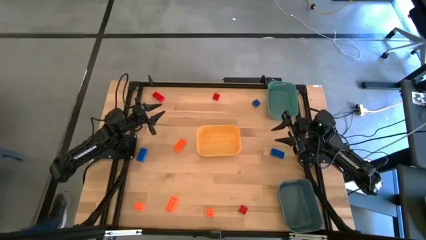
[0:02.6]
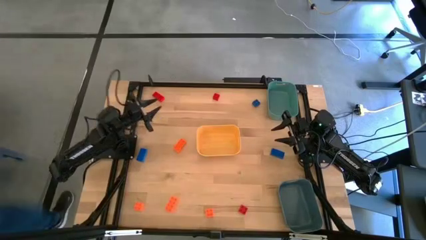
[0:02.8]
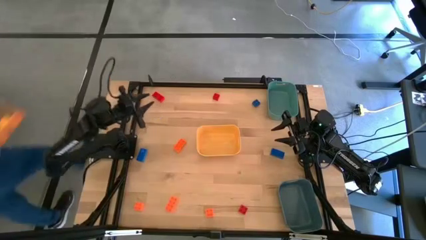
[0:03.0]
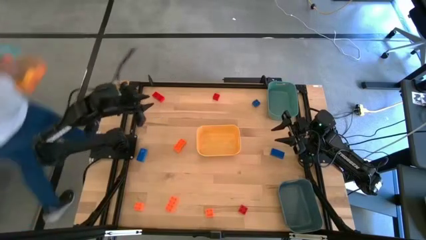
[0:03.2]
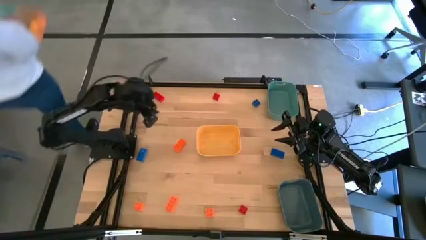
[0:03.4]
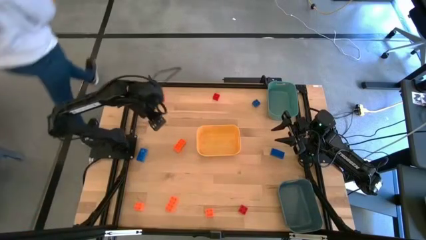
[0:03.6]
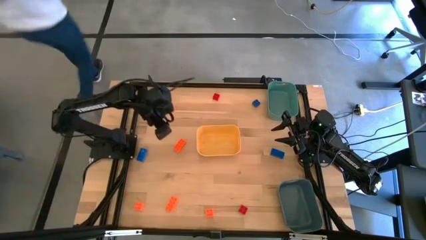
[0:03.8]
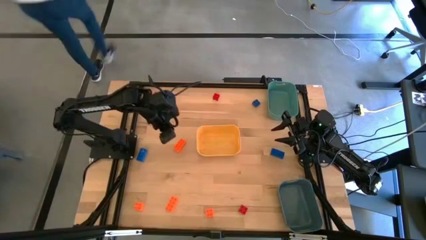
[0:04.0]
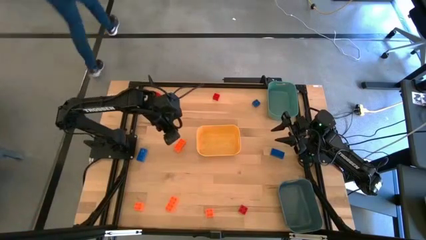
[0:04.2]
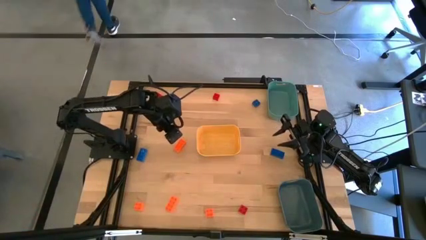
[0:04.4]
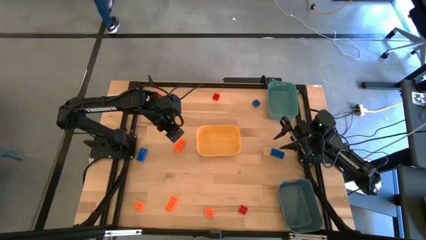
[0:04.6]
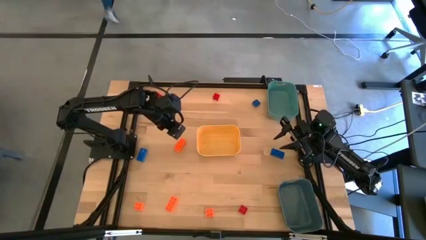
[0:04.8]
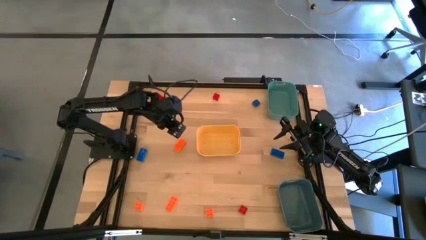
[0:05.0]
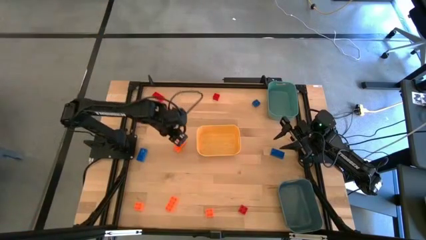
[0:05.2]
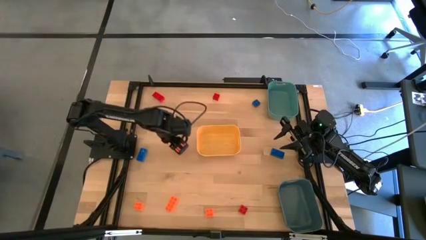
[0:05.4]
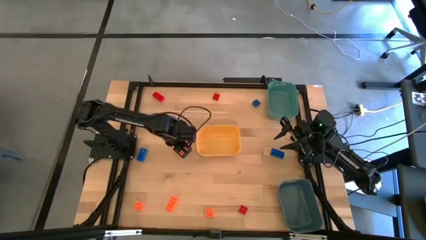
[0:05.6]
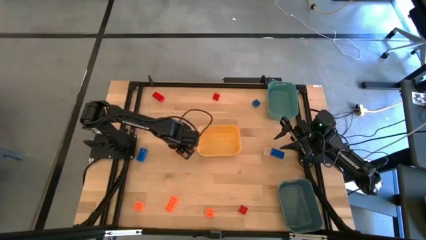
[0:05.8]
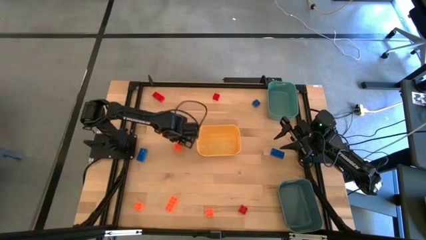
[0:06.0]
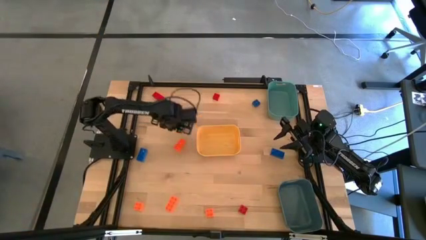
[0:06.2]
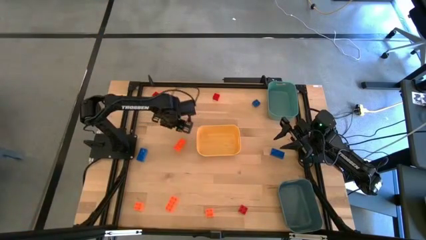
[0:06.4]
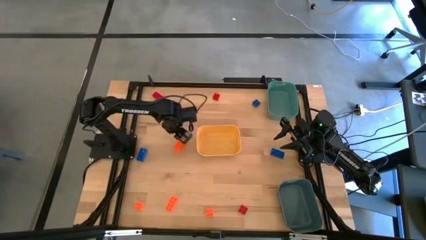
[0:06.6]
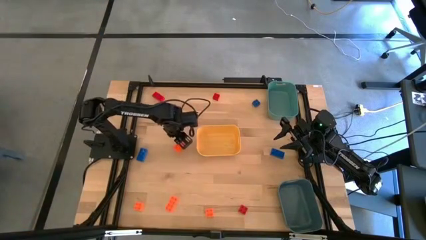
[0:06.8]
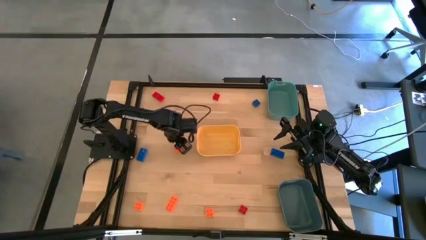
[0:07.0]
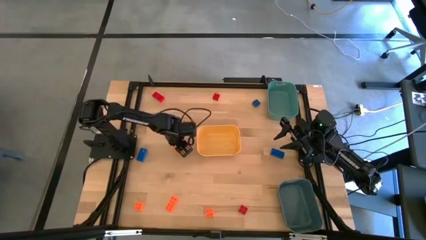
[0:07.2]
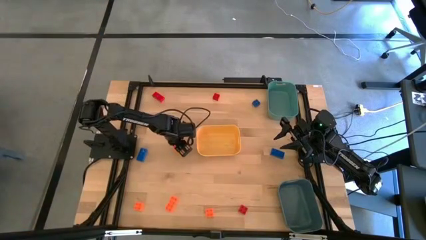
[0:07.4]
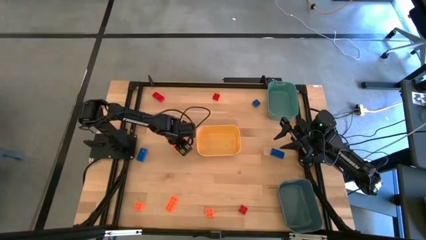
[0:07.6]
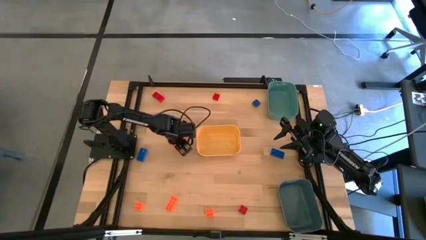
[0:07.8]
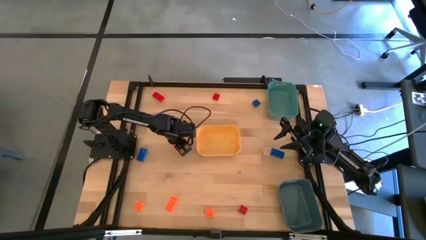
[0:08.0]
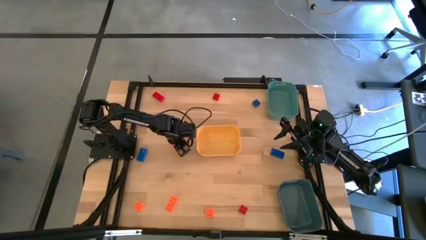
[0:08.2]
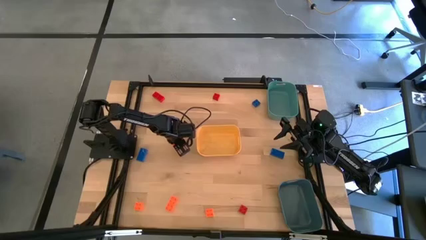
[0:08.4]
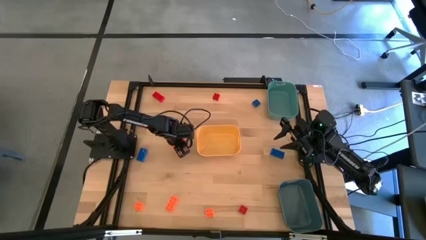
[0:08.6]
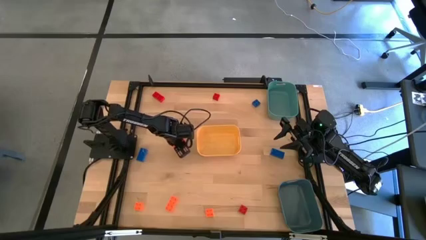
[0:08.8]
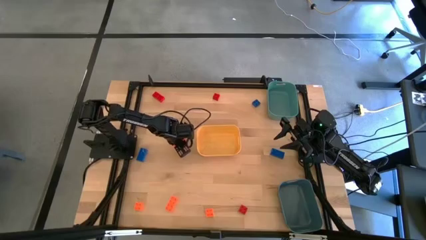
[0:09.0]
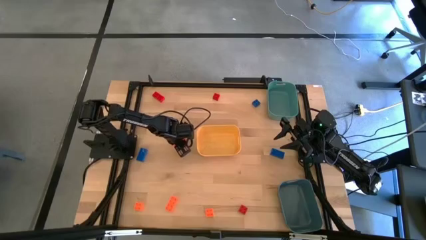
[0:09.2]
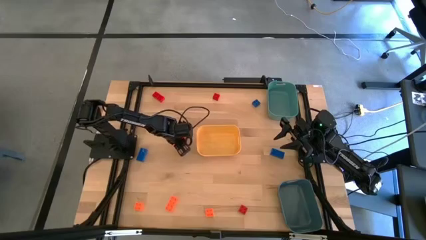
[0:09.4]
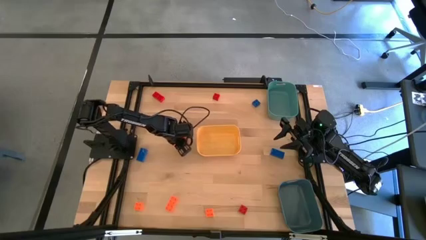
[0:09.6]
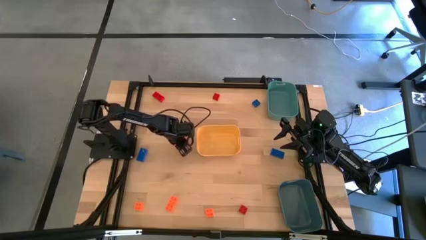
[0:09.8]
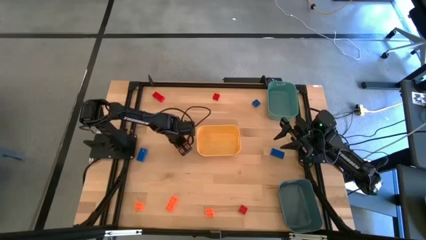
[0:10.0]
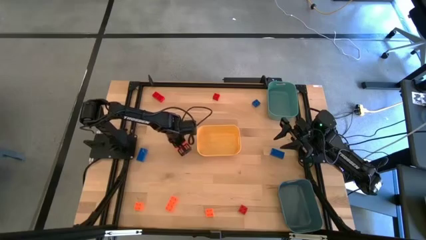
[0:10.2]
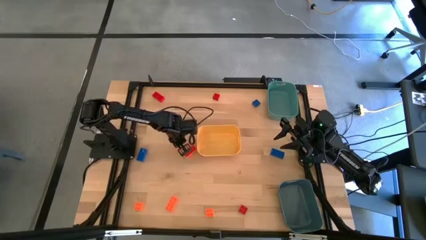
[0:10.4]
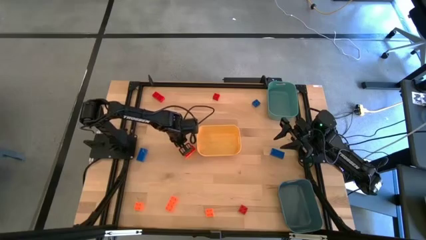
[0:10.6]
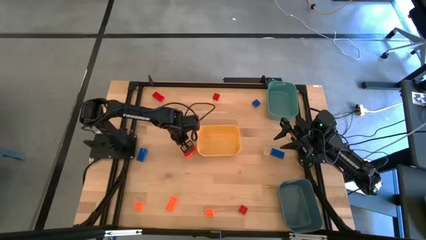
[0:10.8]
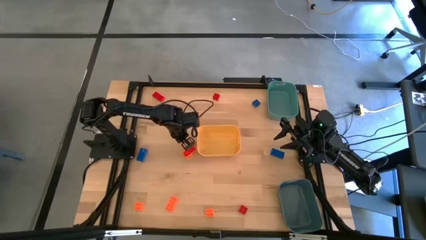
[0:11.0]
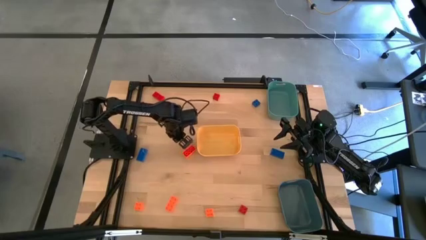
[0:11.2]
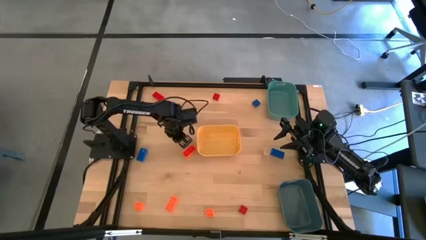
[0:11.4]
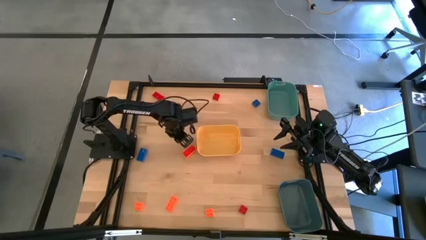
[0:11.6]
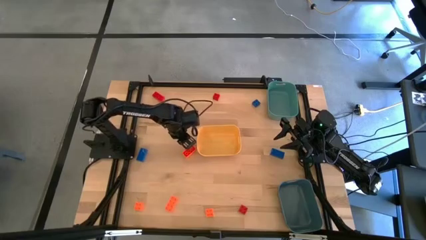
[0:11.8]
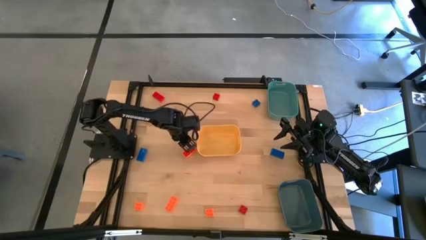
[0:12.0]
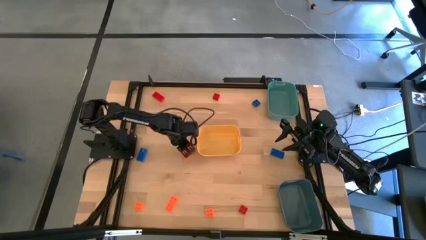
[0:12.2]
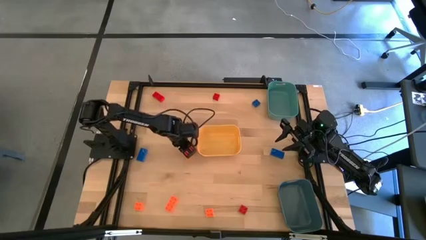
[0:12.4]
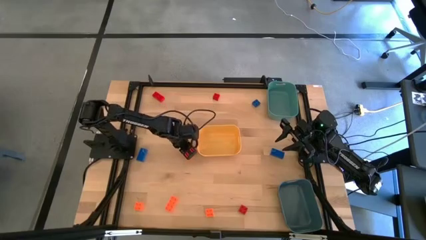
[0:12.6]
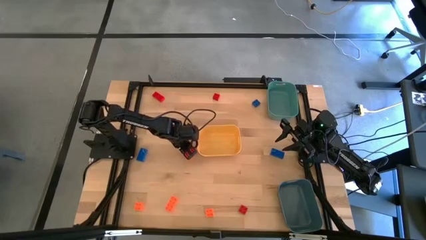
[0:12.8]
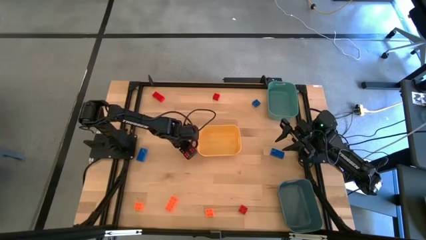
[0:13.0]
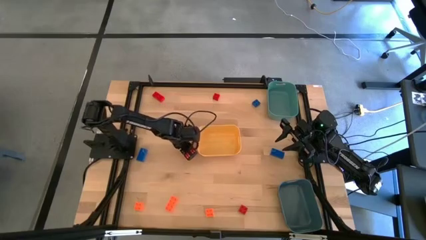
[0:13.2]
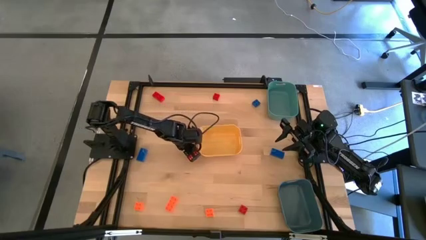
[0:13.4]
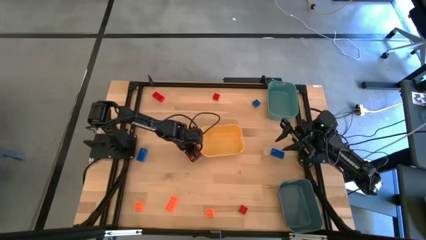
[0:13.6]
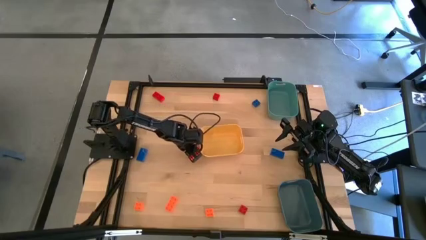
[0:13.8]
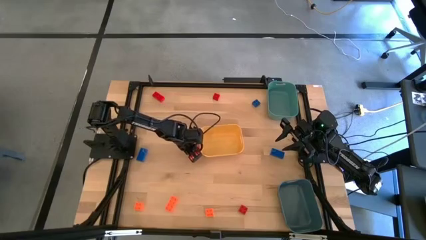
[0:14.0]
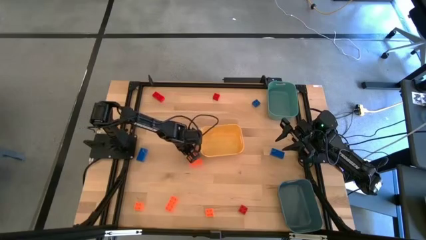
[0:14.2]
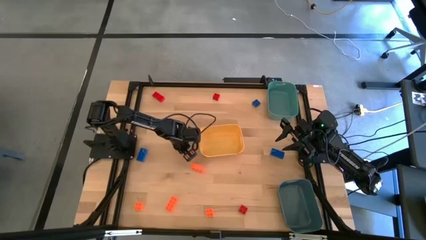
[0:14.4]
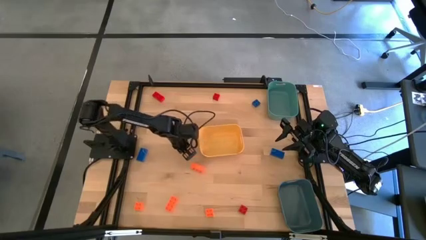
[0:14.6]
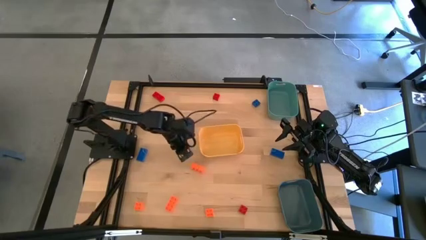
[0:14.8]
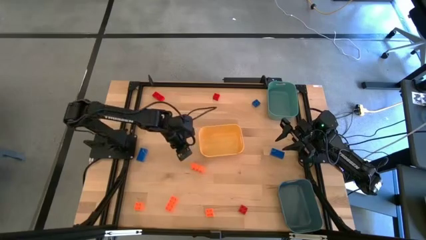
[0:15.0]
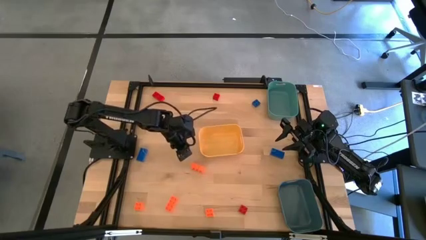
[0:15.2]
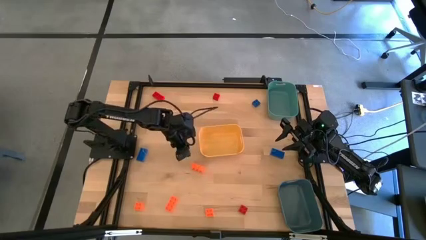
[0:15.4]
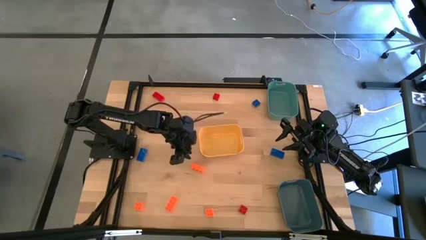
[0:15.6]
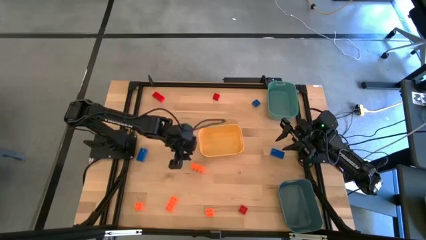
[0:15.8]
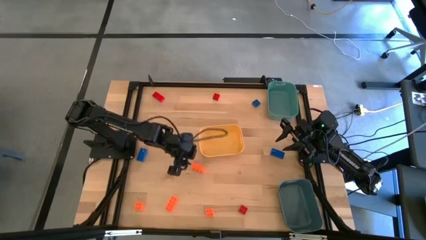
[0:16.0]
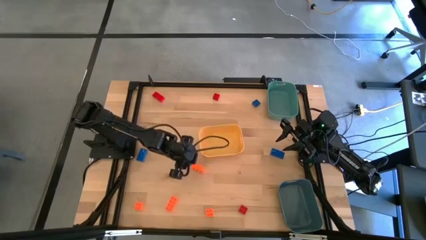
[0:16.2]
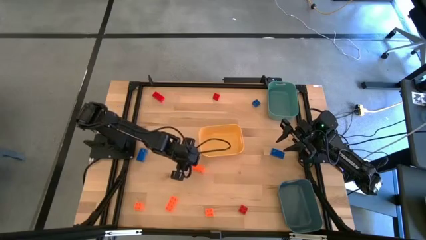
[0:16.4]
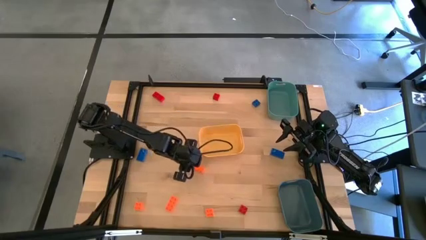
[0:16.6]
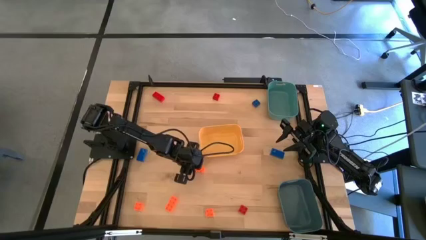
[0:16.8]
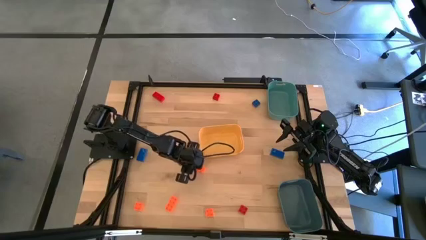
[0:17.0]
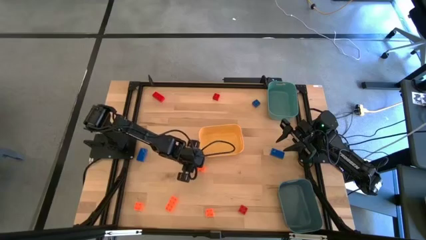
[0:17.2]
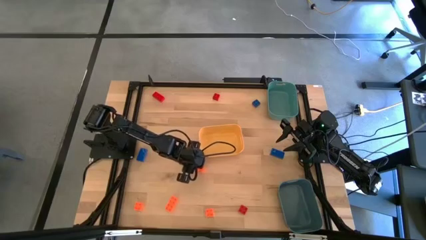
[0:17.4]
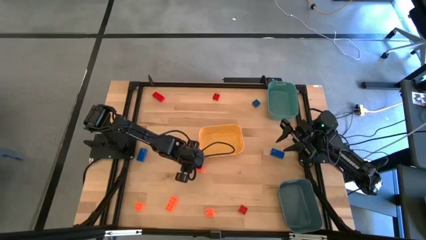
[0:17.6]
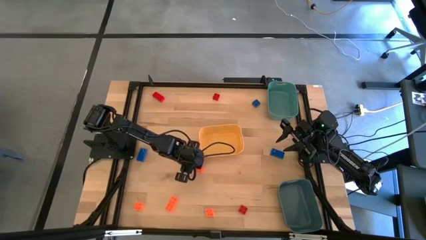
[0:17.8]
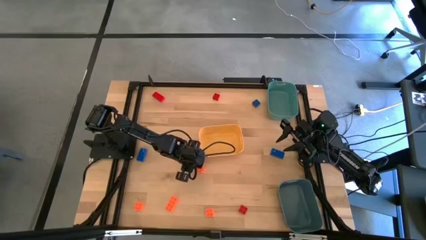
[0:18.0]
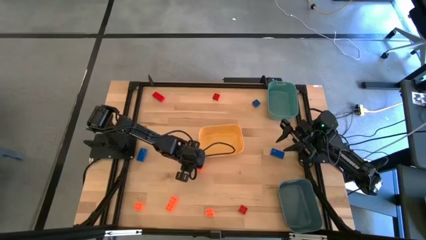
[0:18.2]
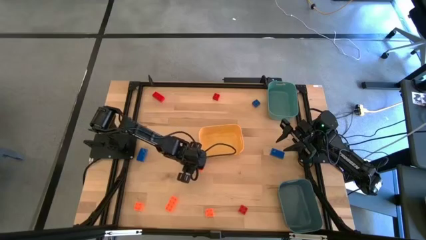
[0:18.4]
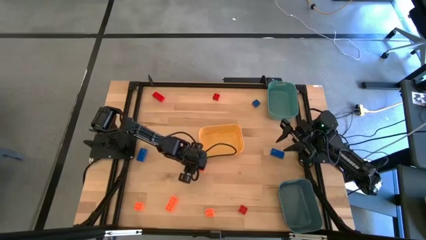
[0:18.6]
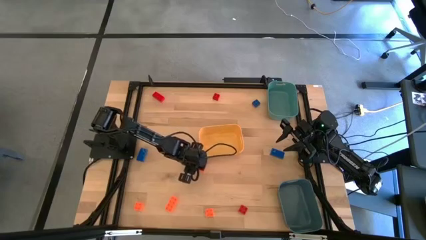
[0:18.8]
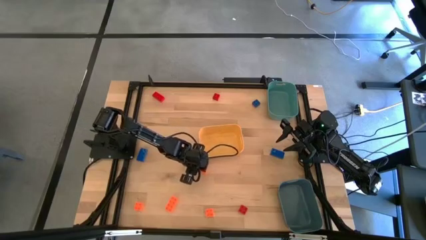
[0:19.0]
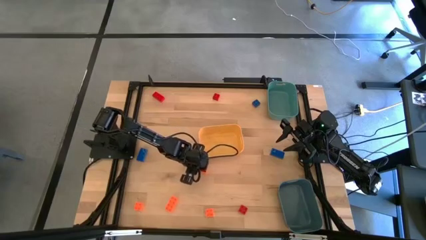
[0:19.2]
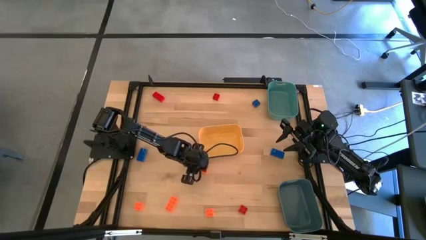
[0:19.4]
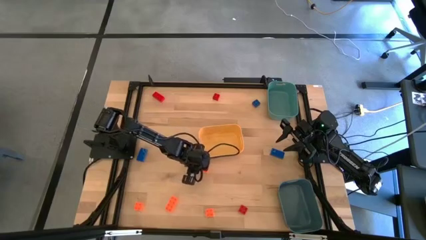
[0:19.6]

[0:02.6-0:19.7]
Task: Sort & place blocks by color
Put the orange game piece into the yellow bin
